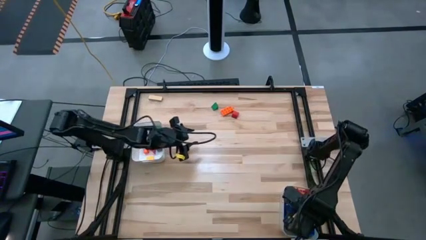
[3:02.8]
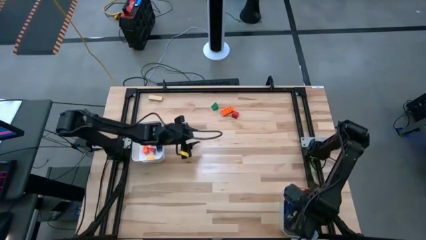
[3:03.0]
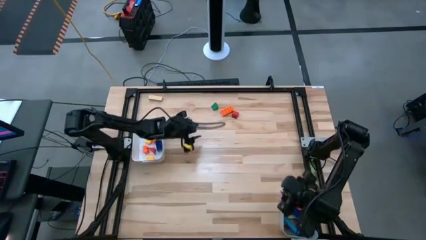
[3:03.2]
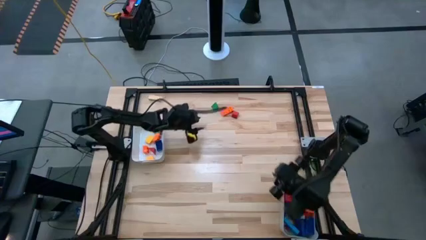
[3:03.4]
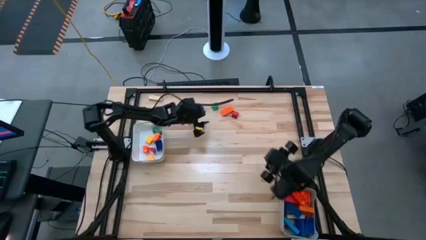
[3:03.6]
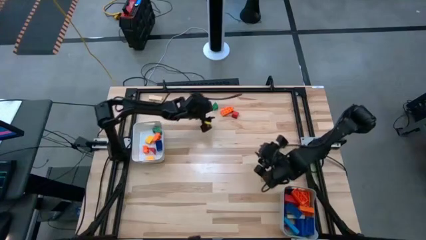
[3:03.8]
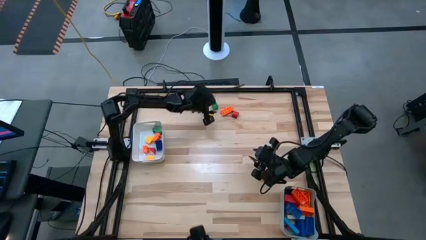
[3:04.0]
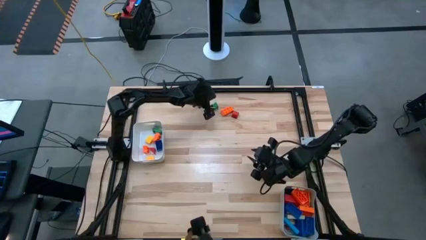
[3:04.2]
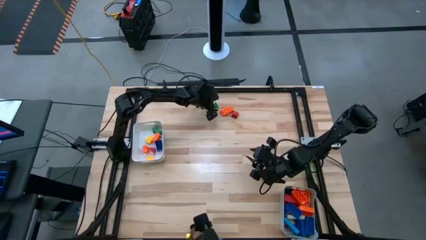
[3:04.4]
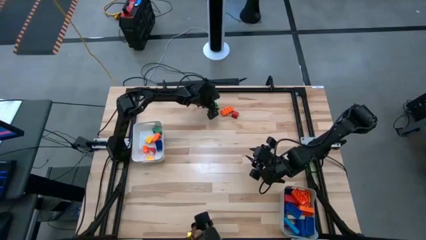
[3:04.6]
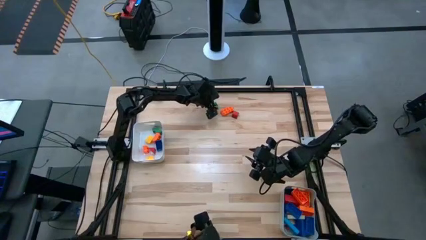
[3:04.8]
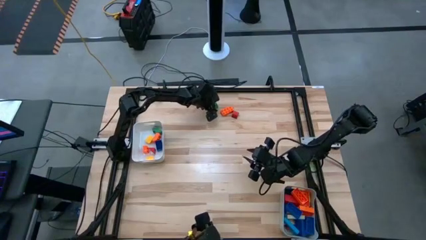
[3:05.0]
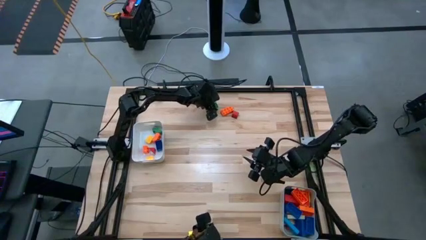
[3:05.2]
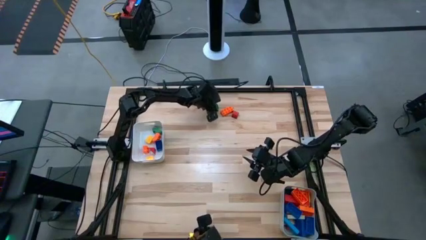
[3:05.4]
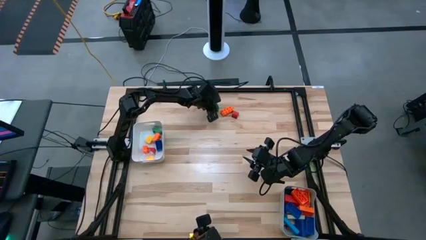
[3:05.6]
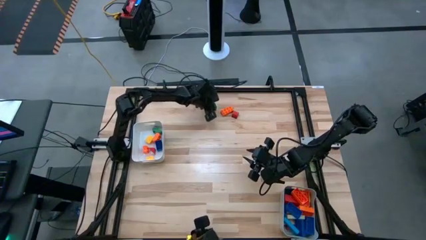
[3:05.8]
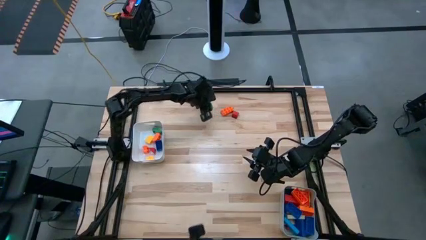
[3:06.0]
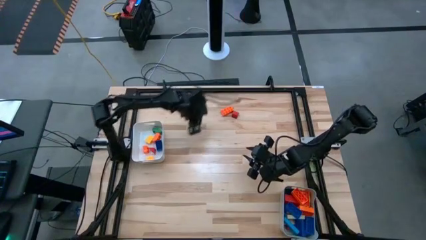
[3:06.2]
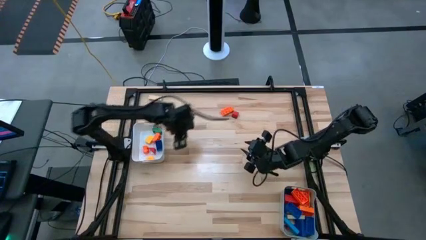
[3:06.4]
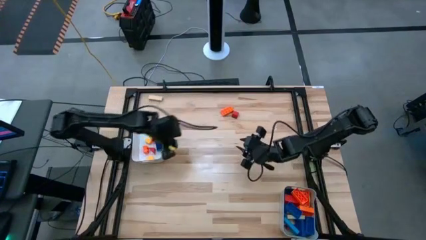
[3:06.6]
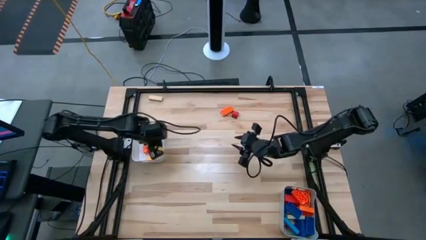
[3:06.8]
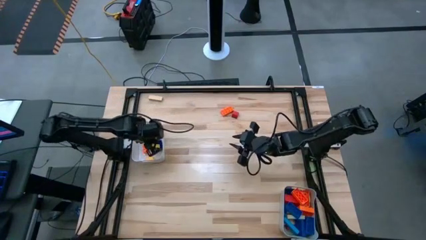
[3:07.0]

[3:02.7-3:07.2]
Task: Sort blocks by size
Put the green small block into the white bin

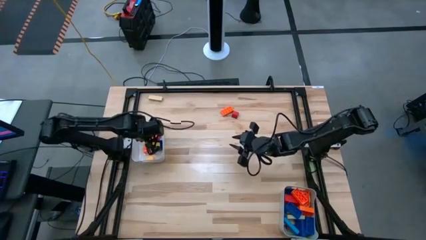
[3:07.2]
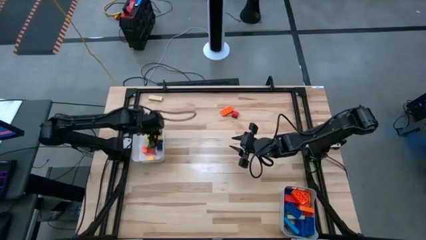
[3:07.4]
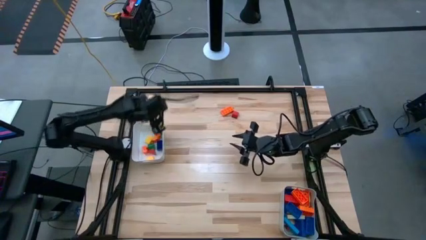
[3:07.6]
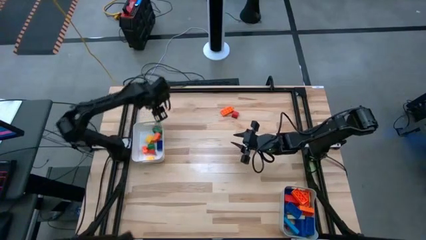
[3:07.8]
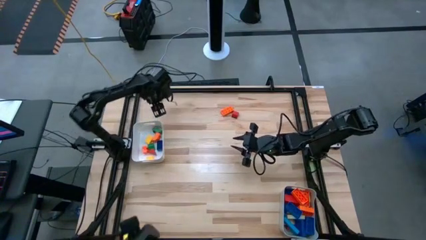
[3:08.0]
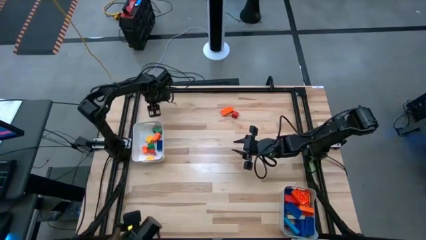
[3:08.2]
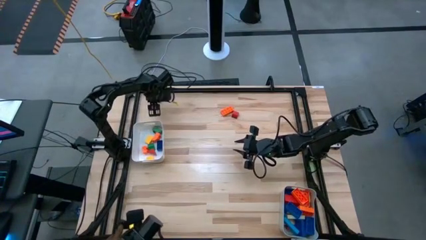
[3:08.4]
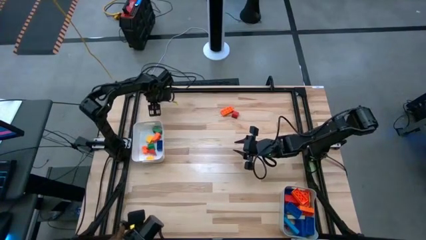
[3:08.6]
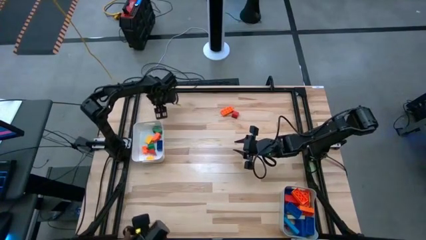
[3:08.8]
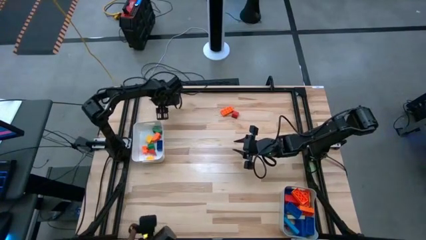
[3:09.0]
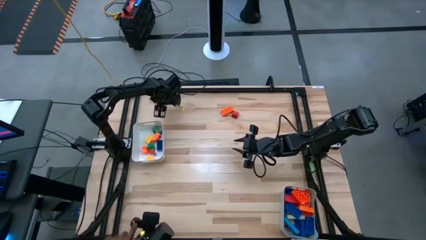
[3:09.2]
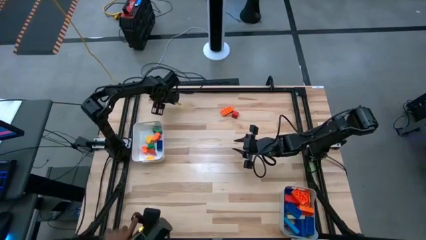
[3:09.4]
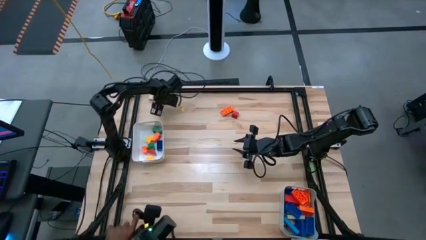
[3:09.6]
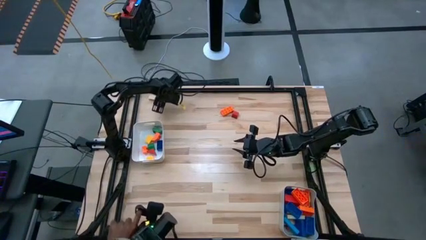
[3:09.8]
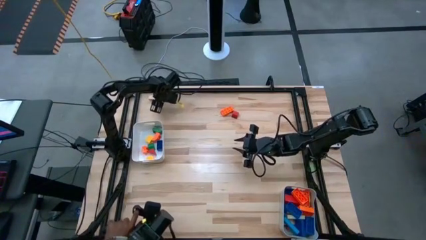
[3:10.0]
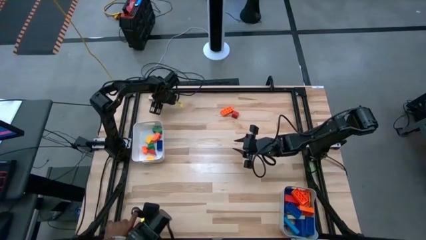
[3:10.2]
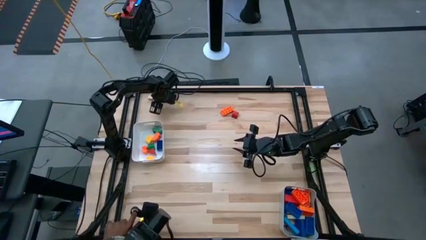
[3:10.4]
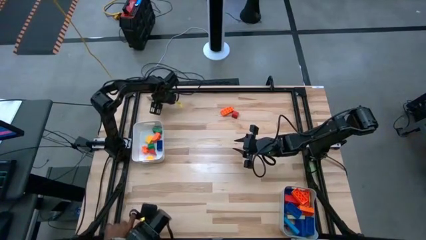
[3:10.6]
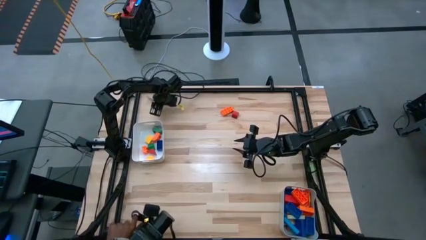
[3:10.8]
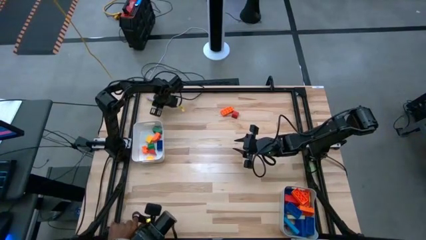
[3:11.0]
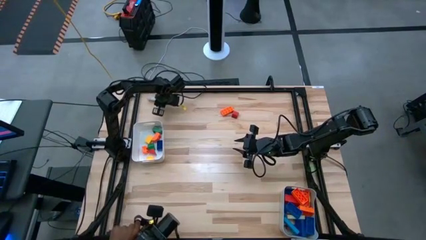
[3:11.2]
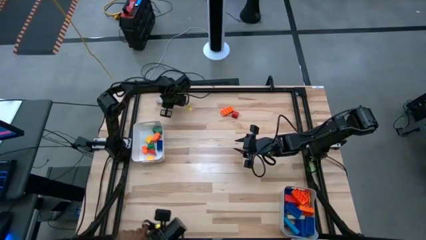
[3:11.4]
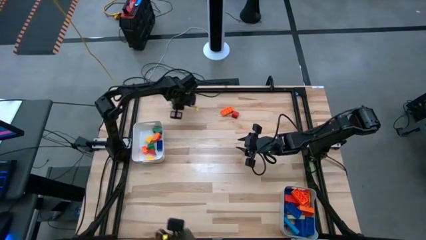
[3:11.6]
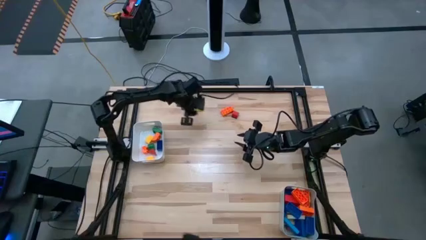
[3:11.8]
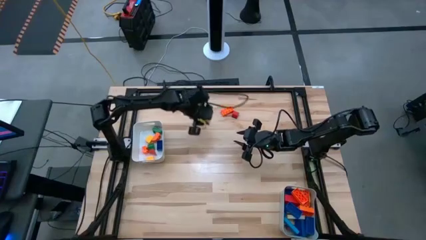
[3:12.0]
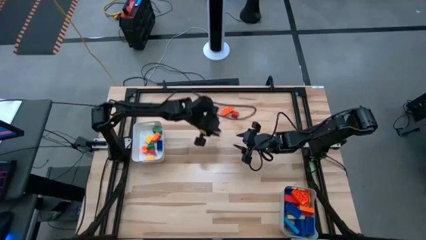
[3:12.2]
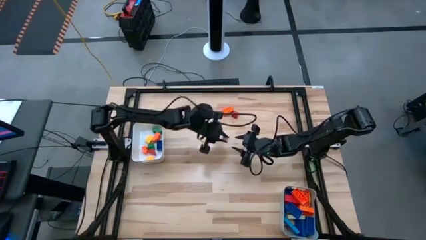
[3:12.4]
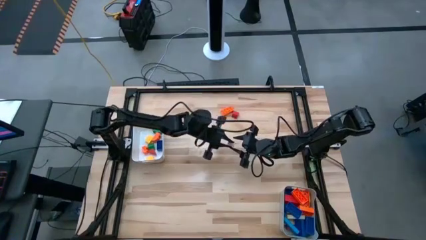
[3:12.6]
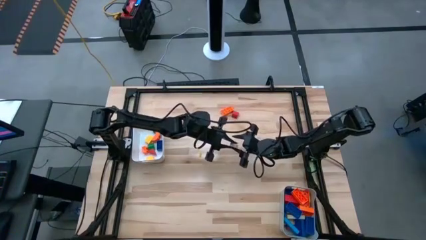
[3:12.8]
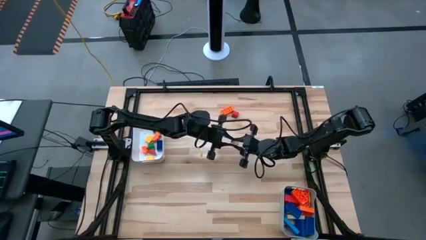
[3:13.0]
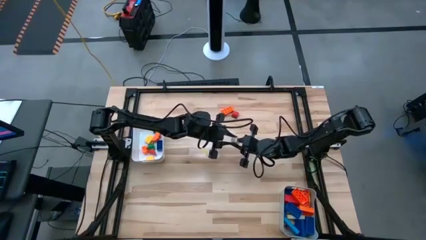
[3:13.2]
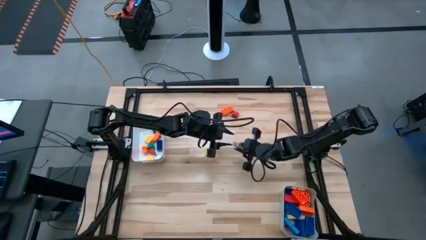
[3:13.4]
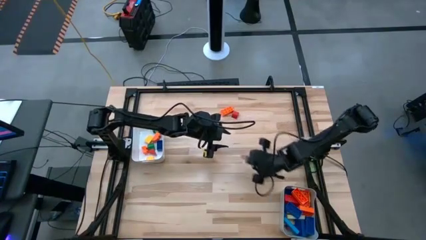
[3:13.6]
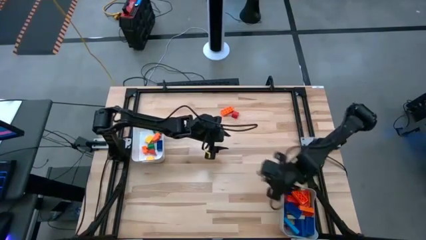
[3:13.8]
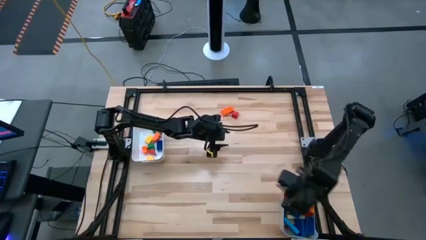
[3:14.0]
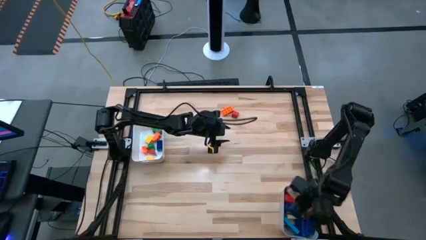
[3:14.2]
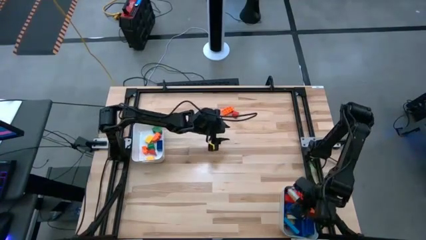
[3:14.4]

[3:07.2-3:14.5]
Put the brown large block into the gray bin

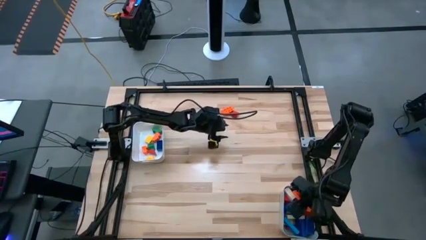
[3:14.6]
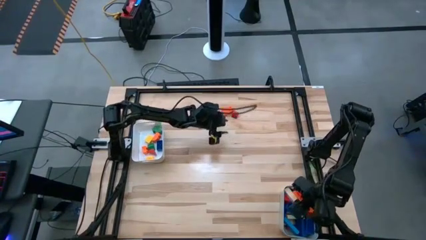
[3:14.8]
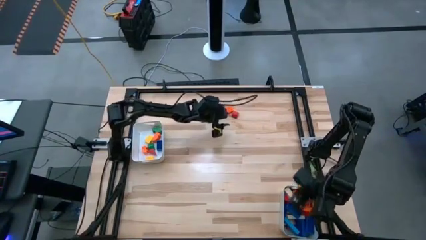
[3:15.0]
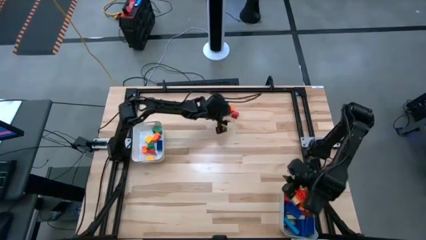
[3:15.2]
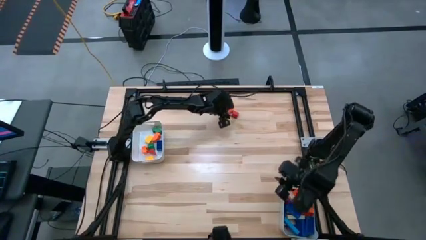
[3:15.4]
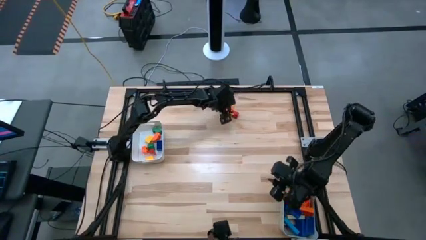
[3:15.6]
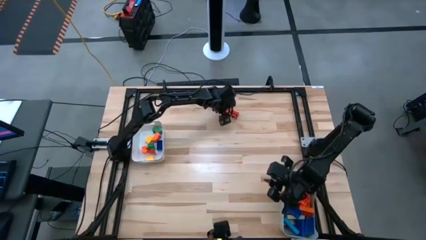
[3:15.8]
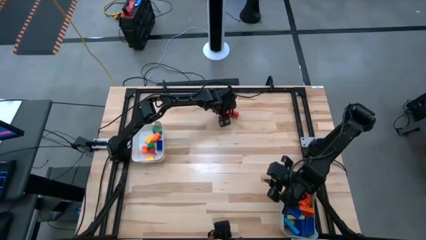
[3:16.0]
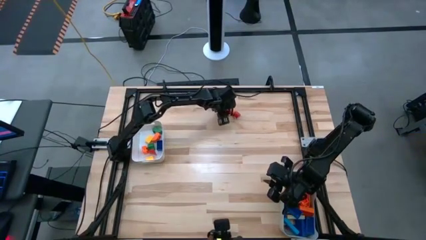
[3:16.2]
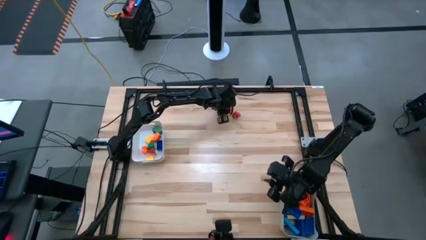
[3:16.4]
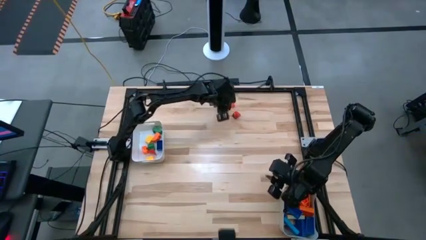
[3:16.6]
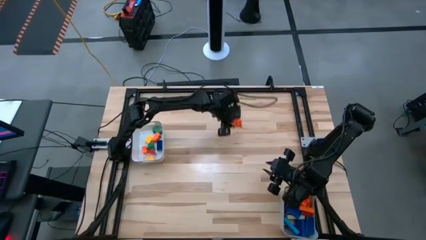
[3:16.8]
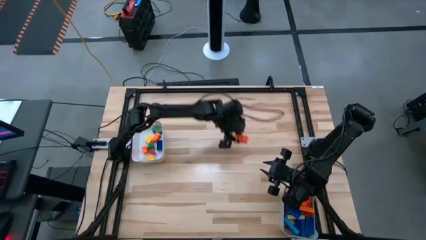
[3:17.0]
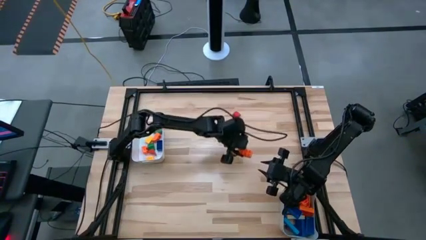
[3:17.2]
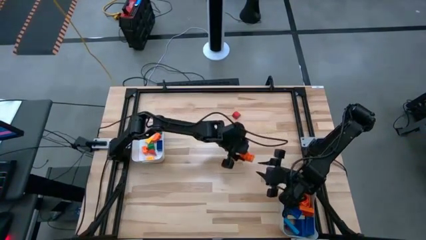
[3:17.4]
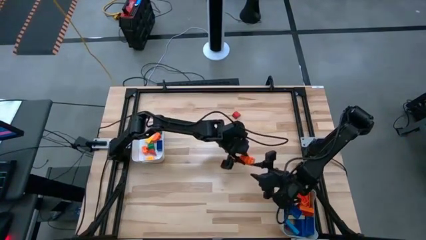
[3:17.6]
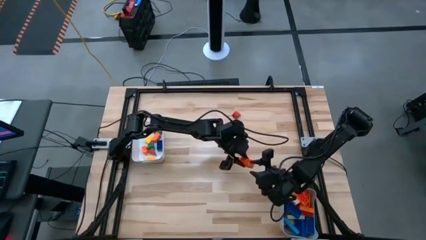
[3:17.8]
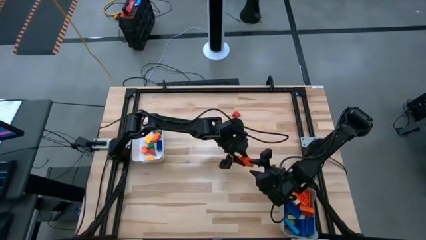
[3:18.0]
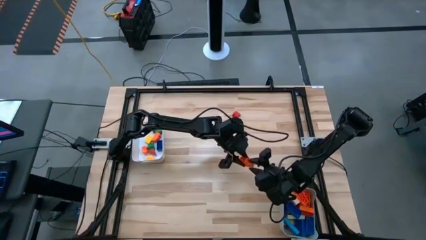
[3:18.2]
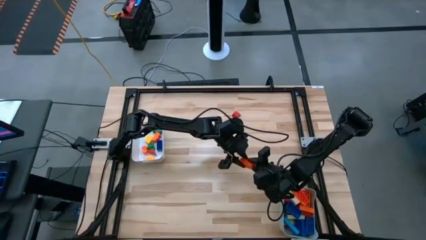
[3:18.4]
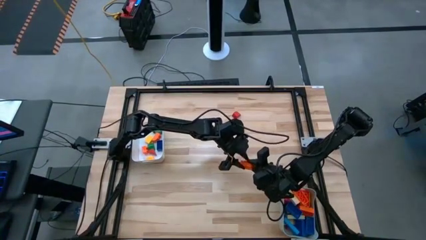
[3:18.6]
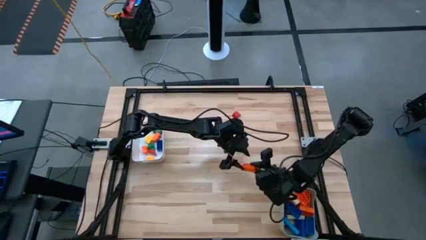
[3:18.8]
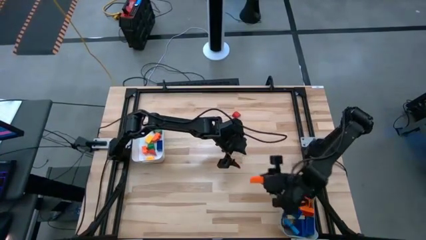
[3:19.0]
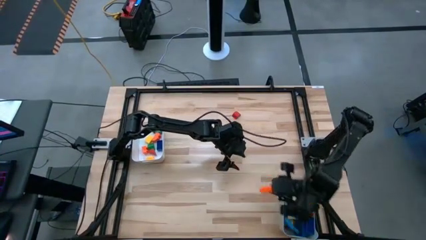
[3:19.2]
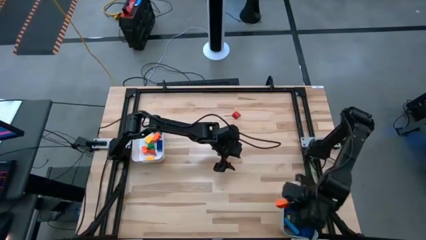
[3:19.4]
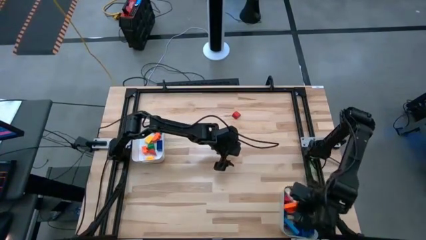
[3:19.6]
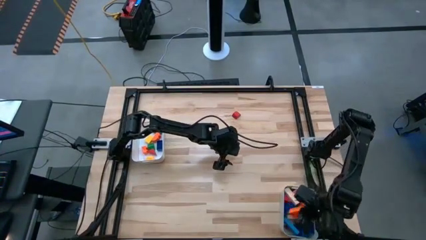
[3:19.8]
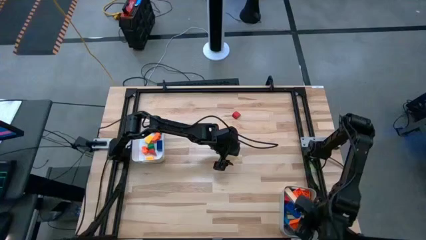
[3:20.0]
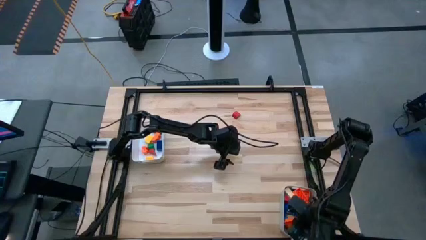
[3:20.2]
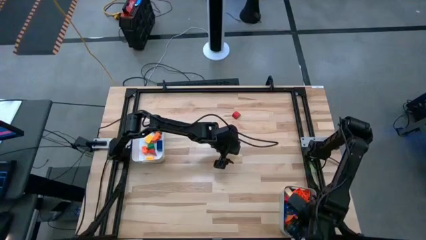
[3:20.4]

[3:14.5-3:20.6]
Put the orange large game piece into the gray bin
